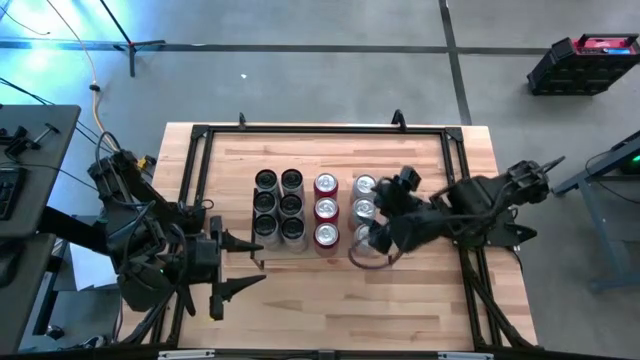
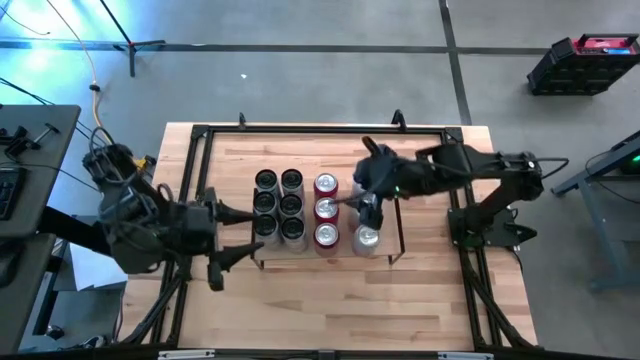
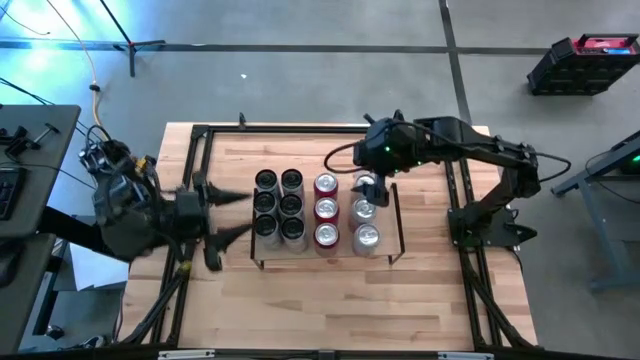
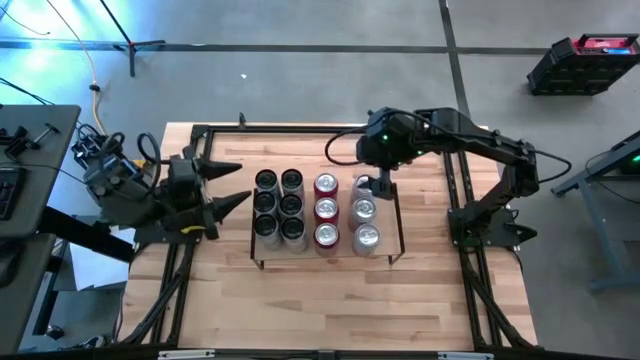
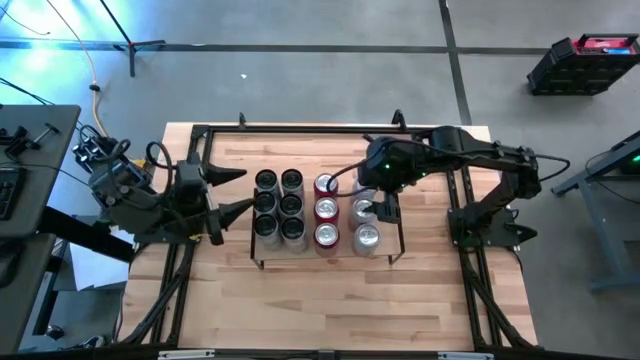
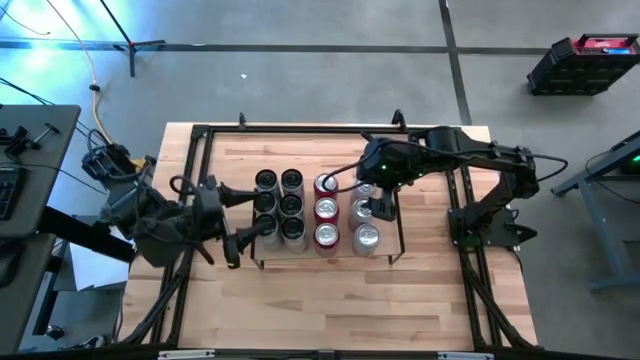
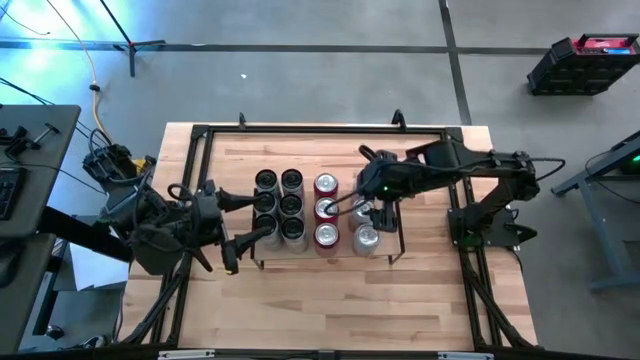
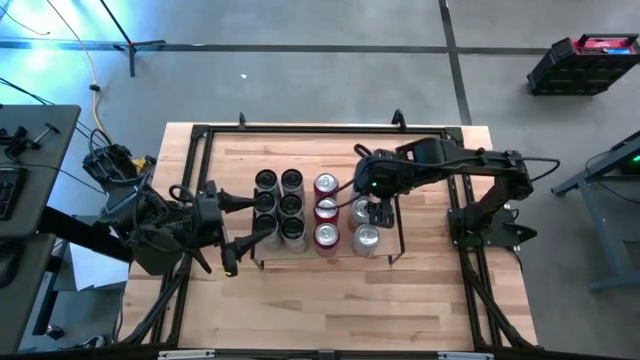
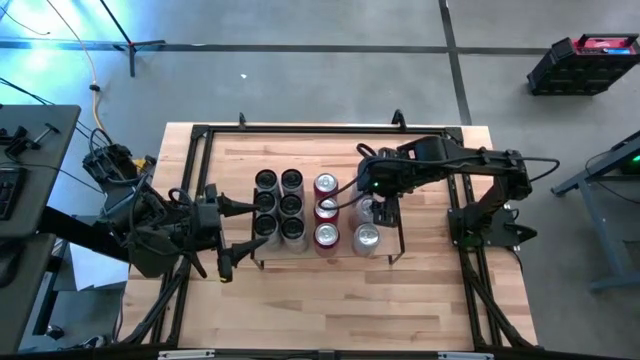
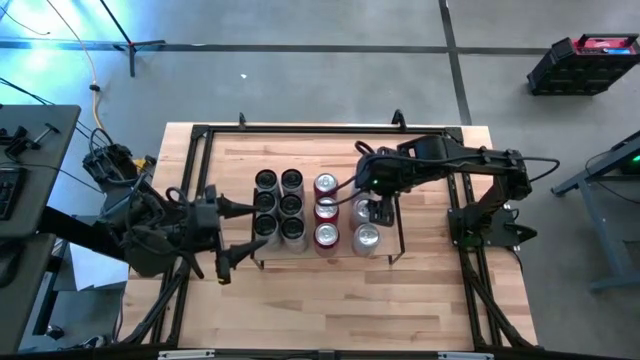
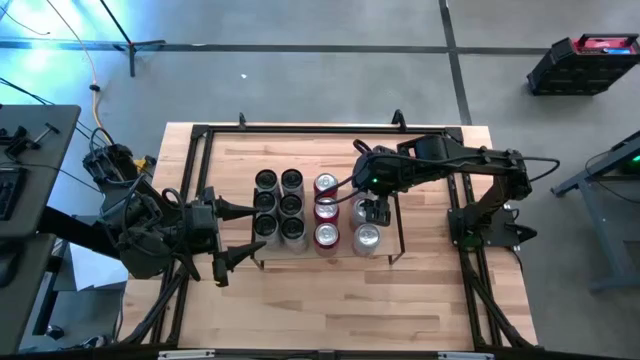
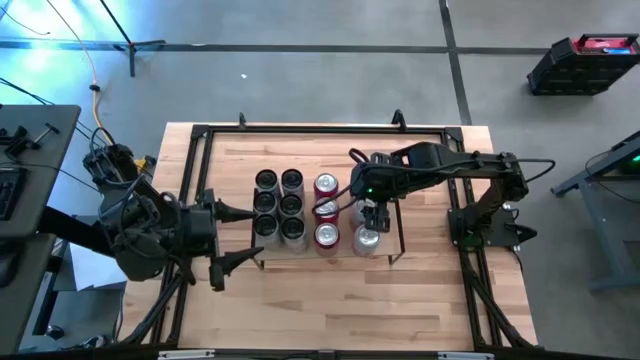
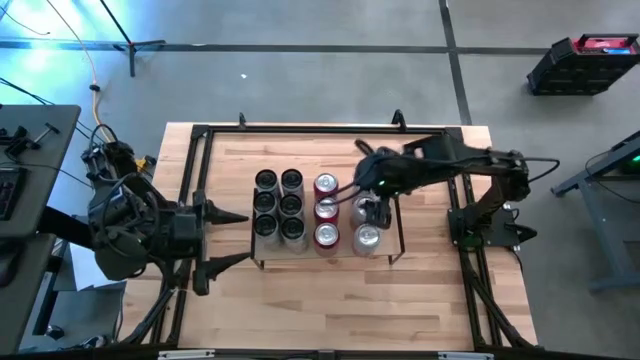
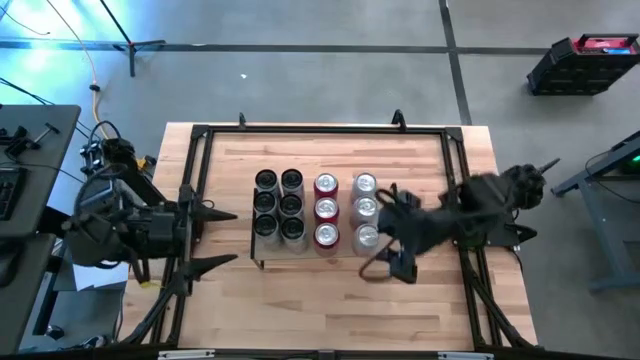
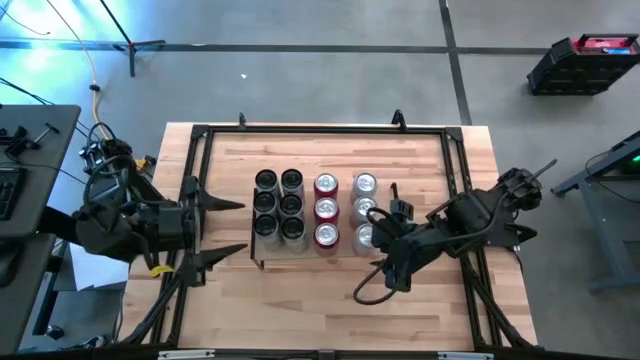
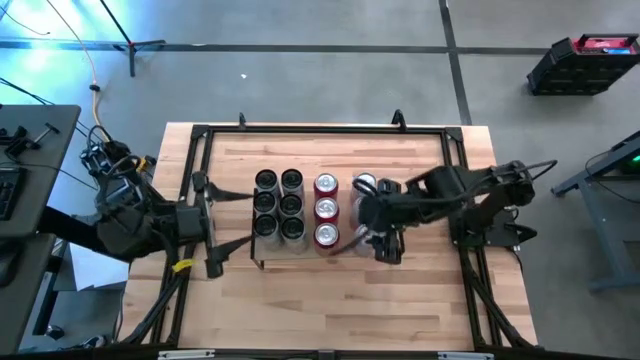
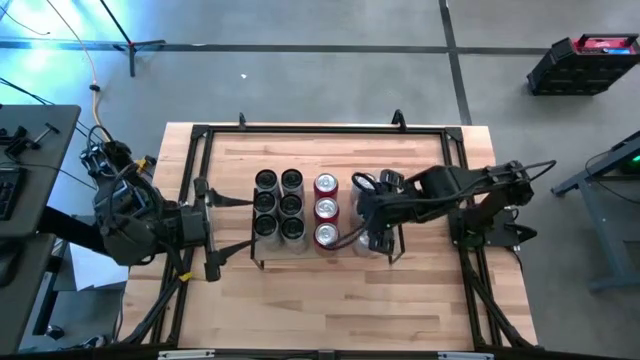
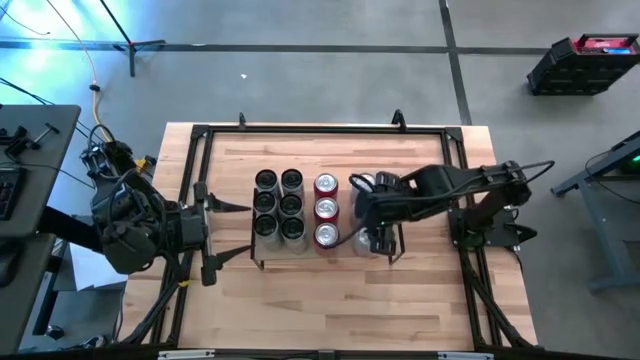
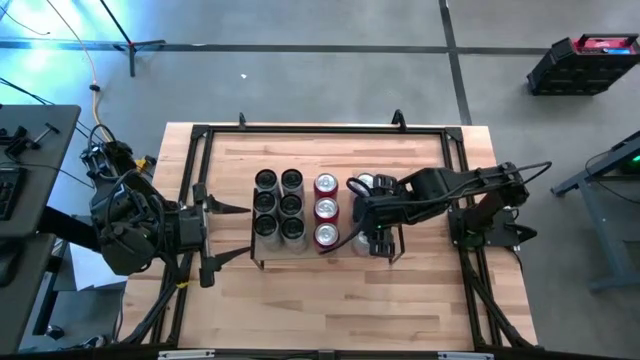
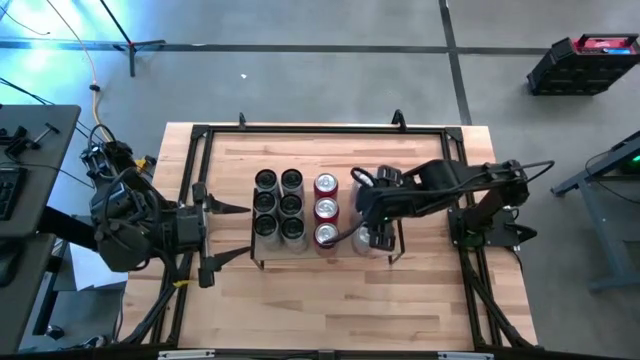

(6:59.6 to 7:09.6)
Task: Place canned beverage on shelf
Adjust the soda cans on the shelf

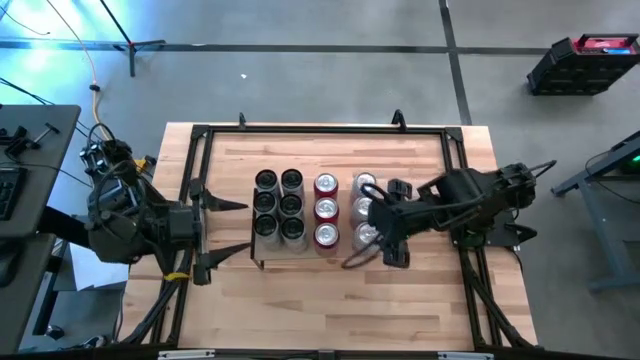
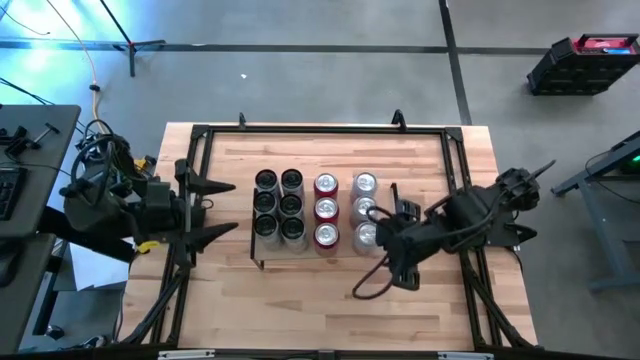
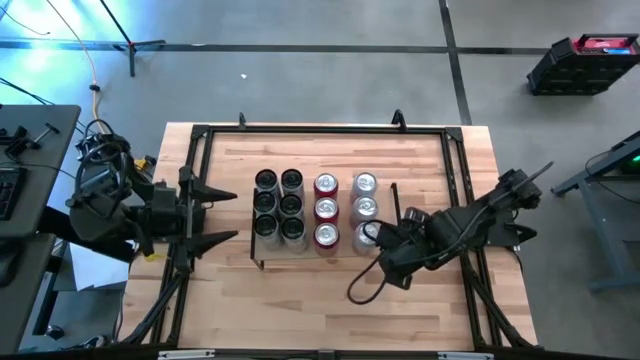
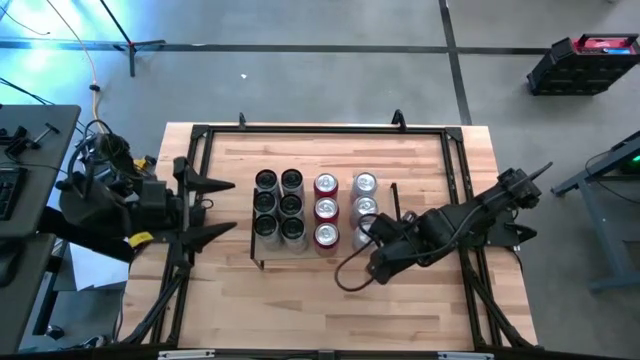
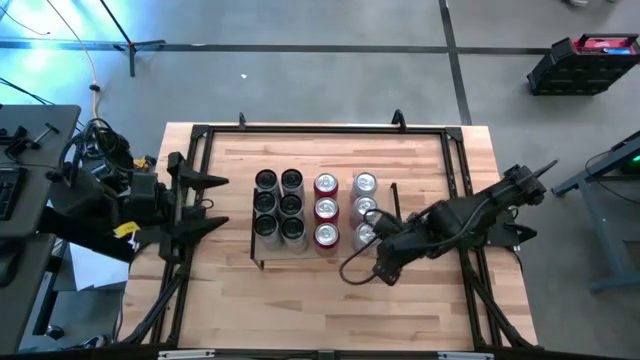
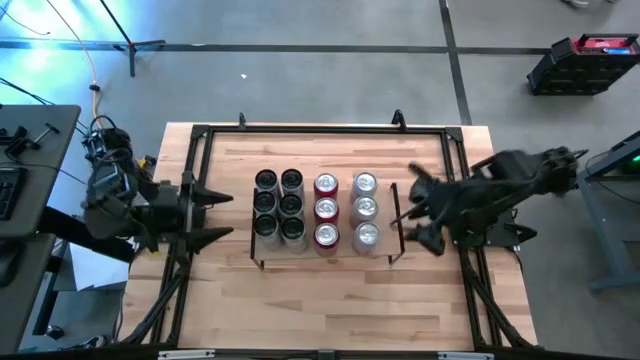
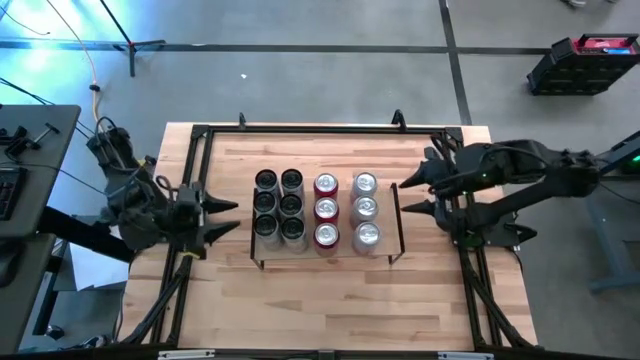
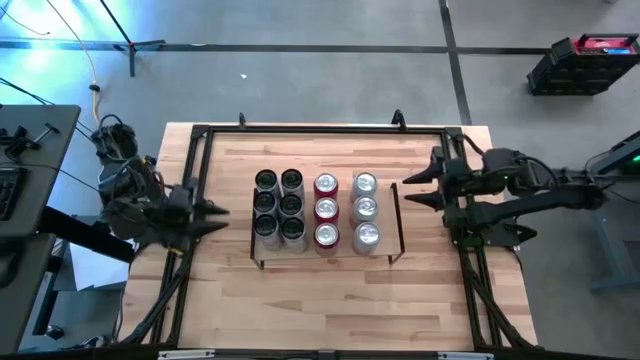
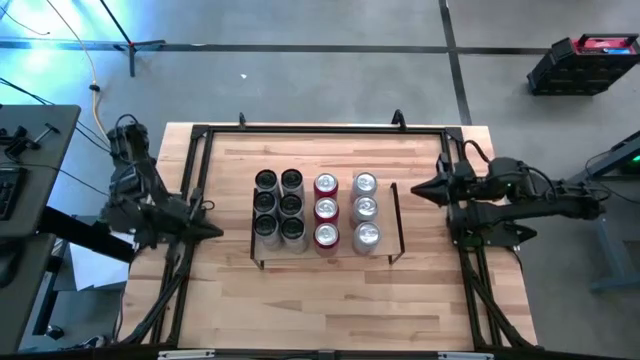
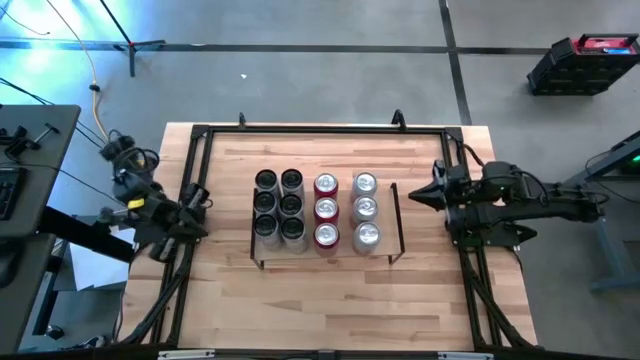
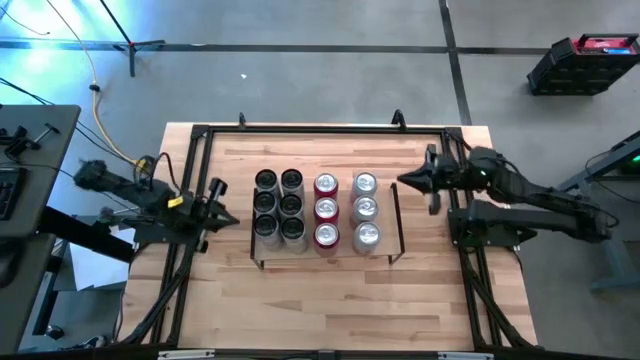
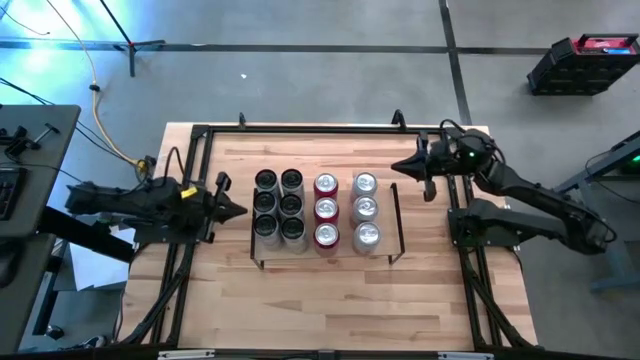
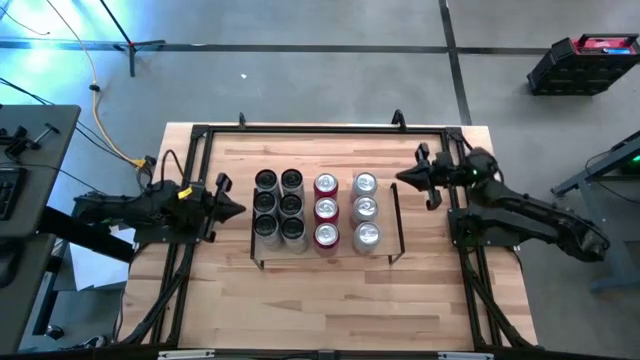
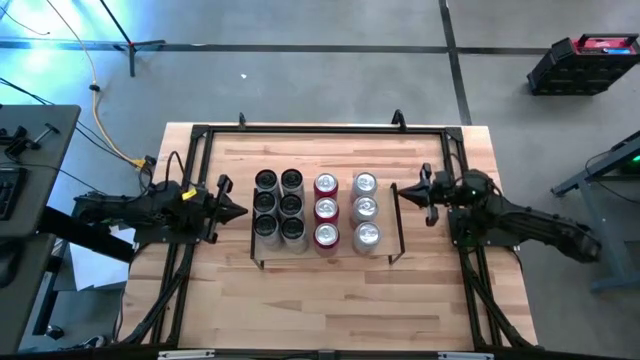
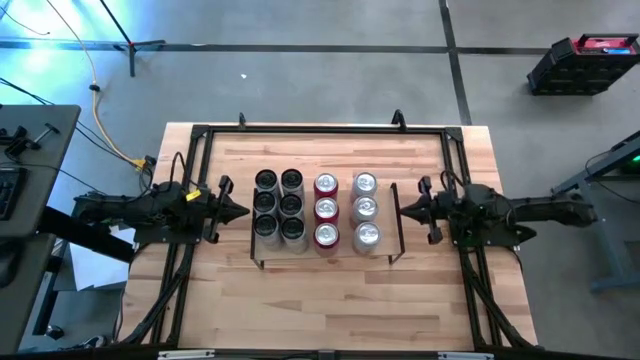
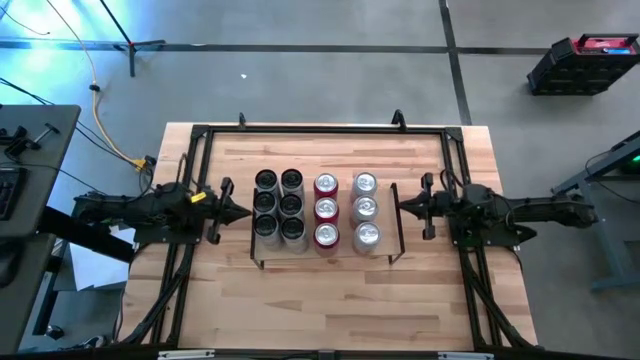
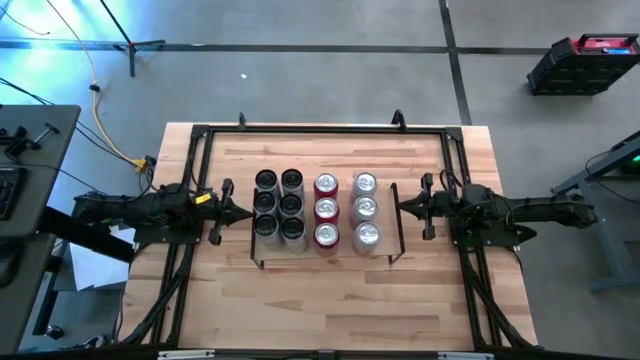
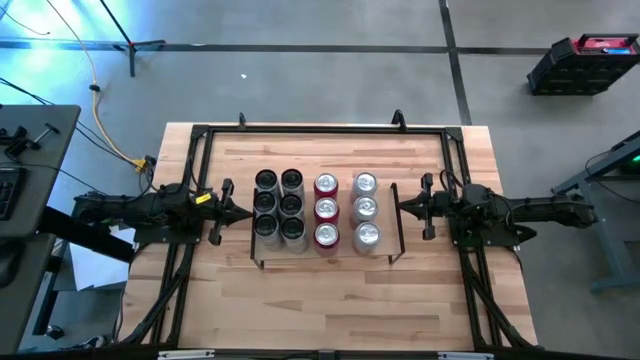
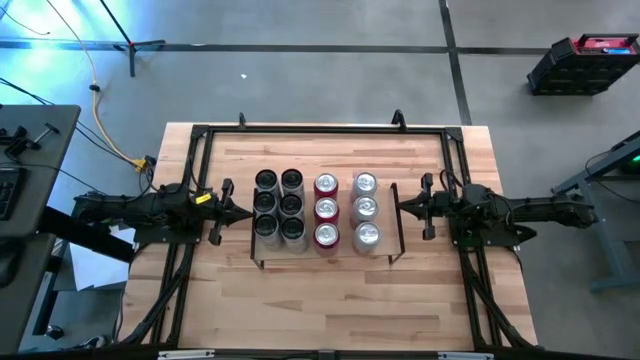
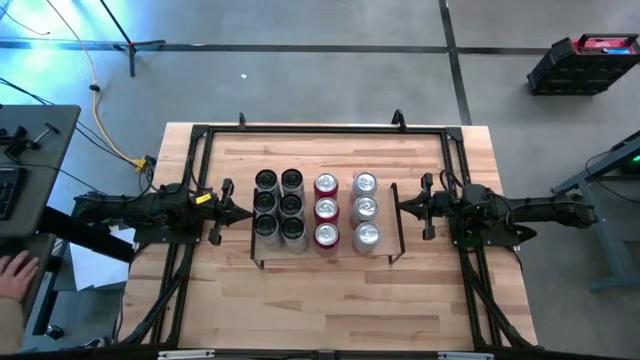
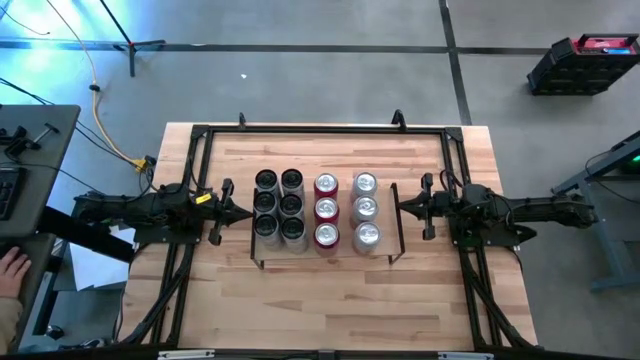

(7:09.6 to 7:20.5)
Return to Home Position
